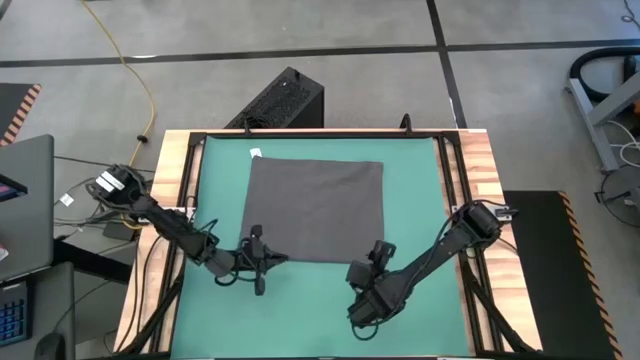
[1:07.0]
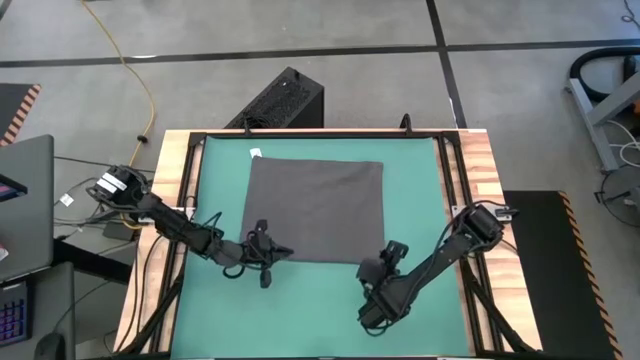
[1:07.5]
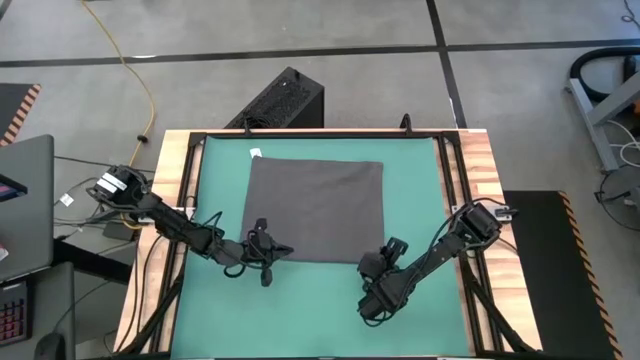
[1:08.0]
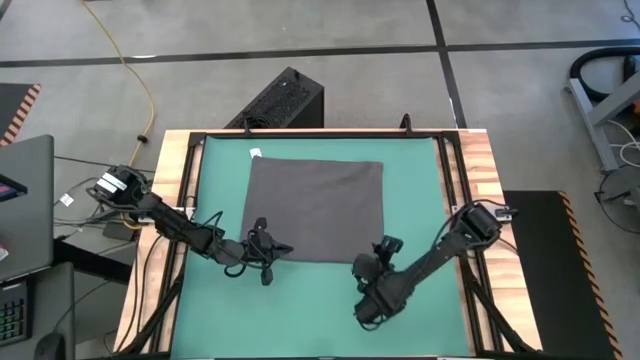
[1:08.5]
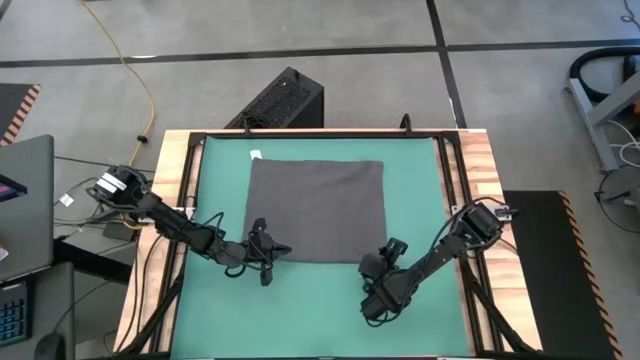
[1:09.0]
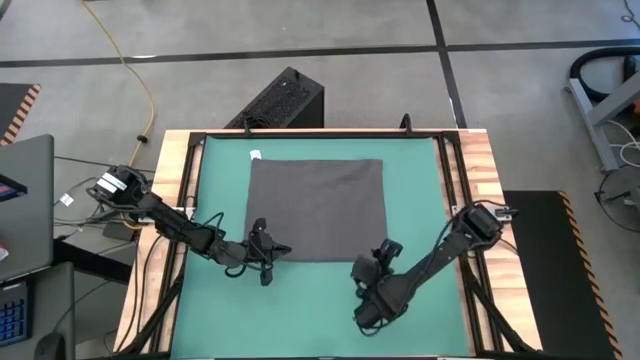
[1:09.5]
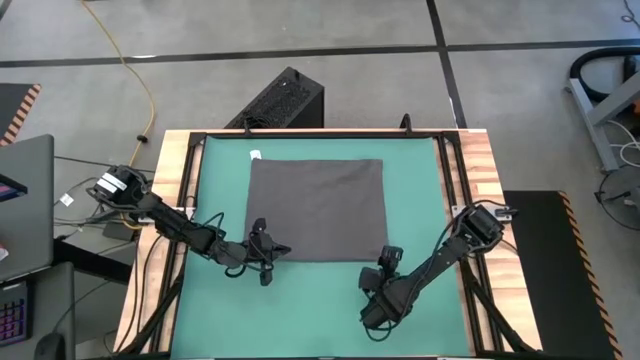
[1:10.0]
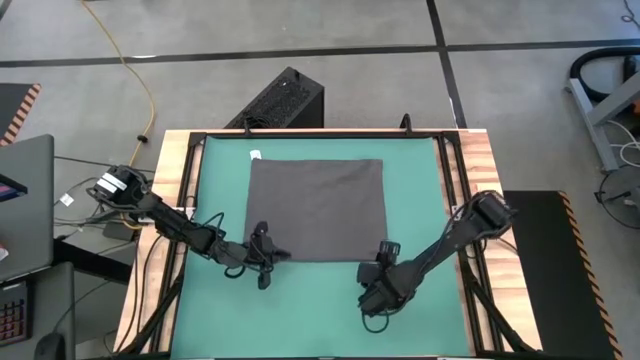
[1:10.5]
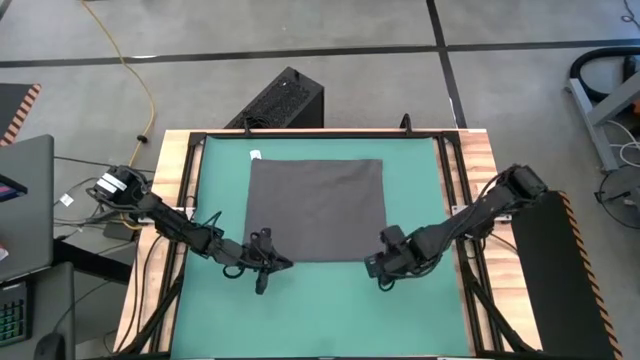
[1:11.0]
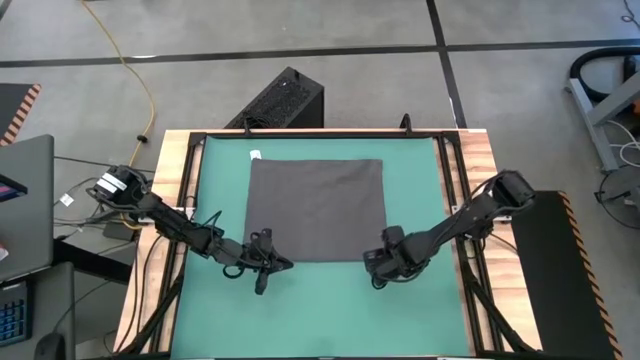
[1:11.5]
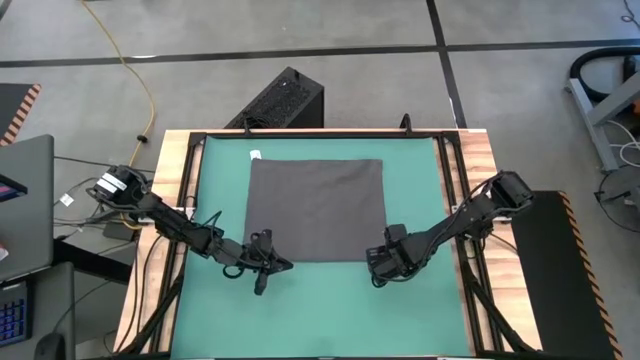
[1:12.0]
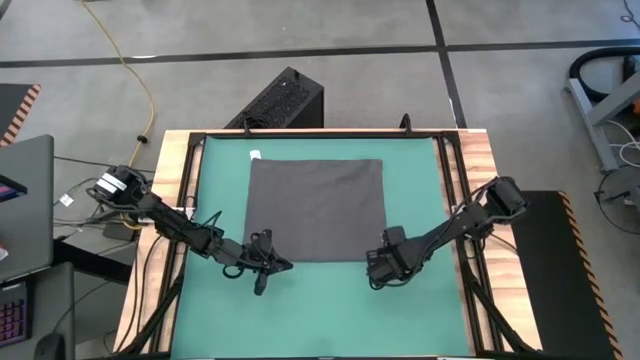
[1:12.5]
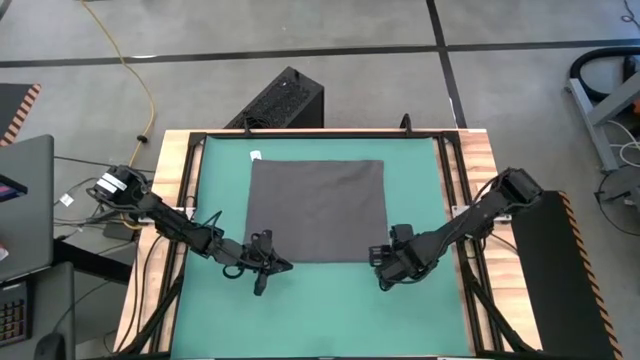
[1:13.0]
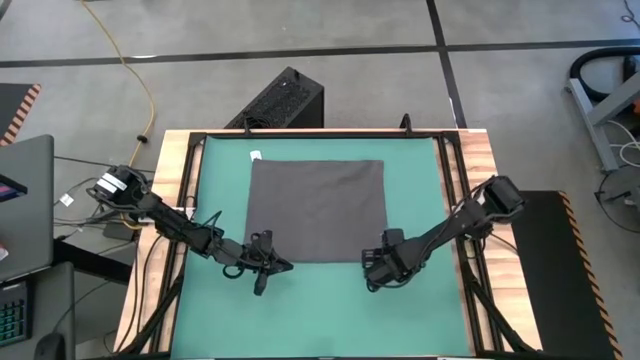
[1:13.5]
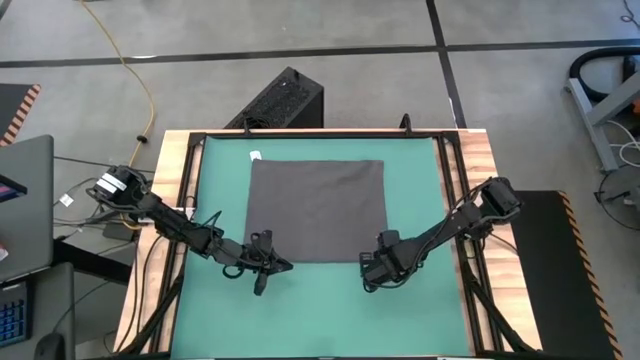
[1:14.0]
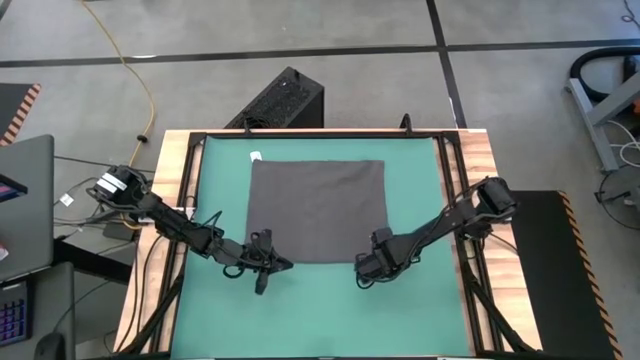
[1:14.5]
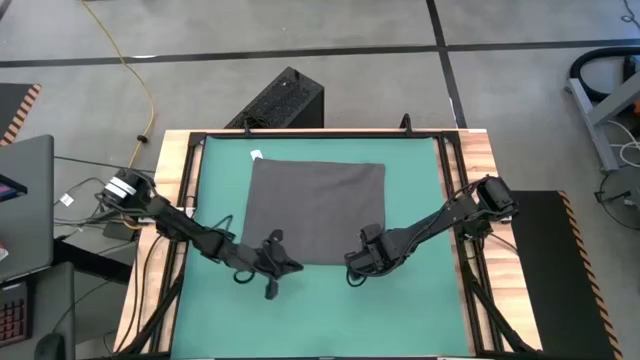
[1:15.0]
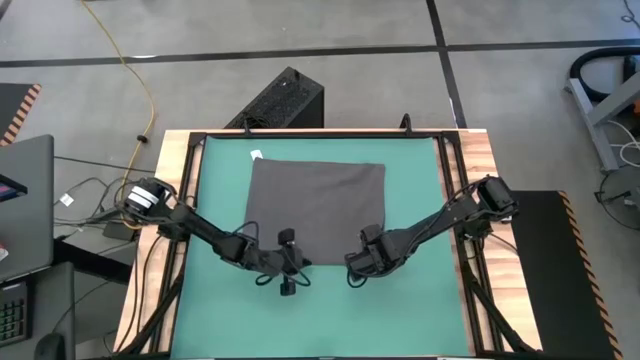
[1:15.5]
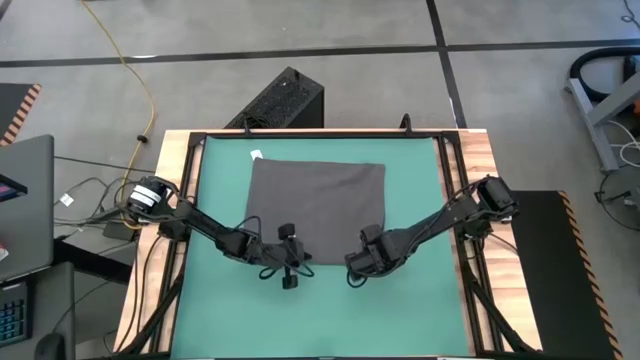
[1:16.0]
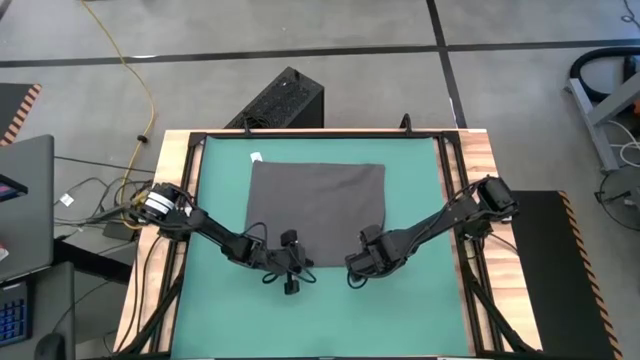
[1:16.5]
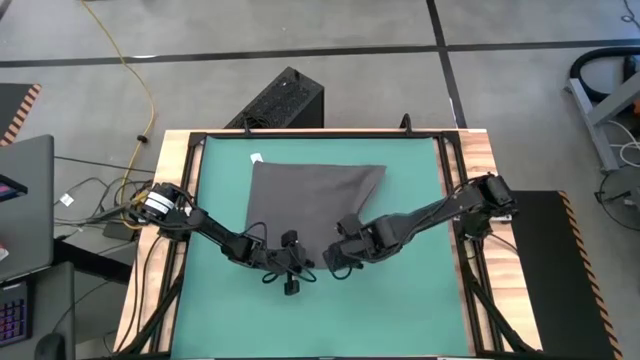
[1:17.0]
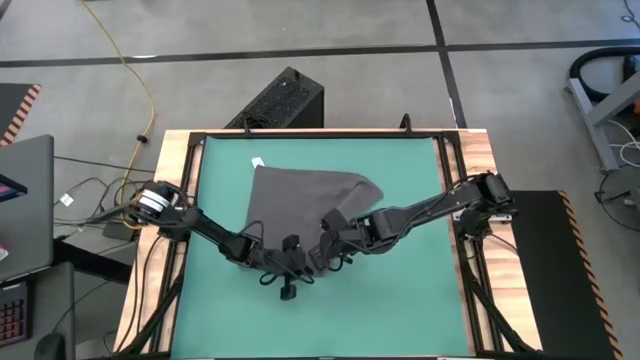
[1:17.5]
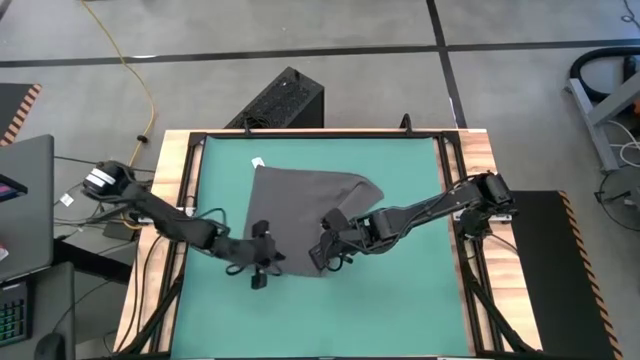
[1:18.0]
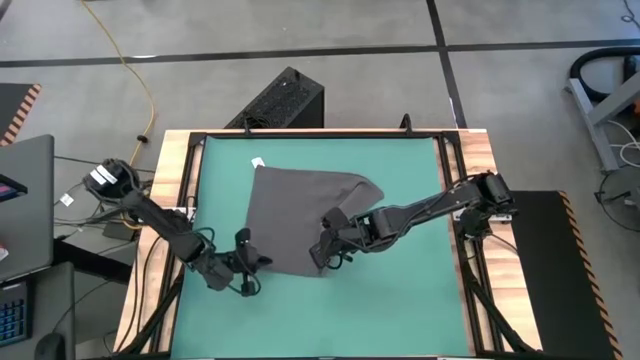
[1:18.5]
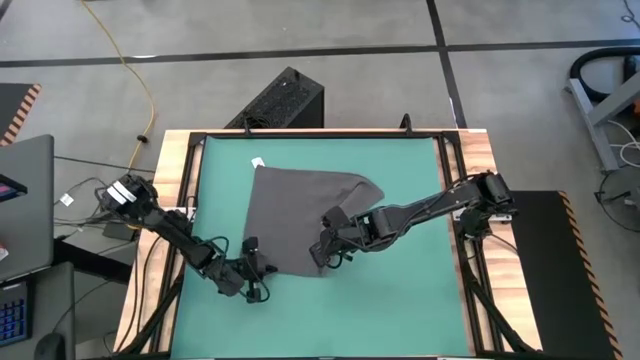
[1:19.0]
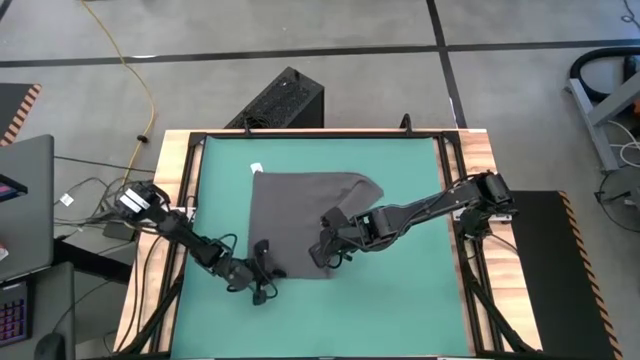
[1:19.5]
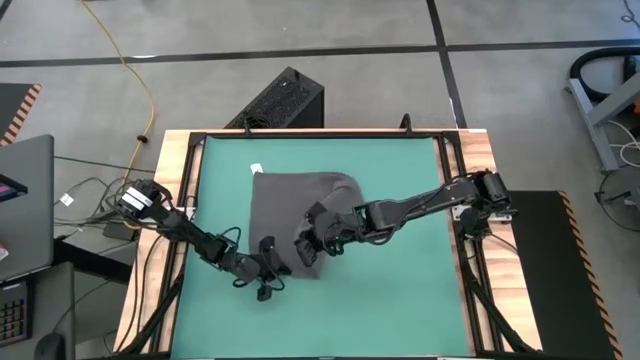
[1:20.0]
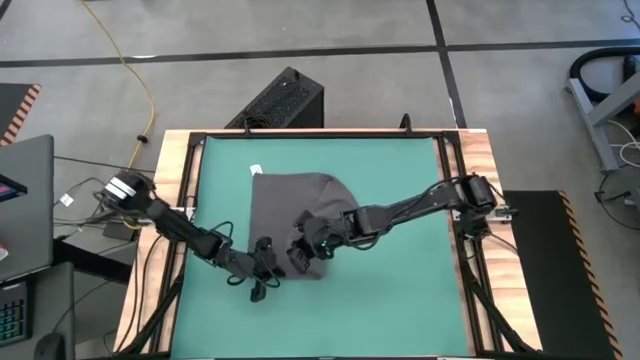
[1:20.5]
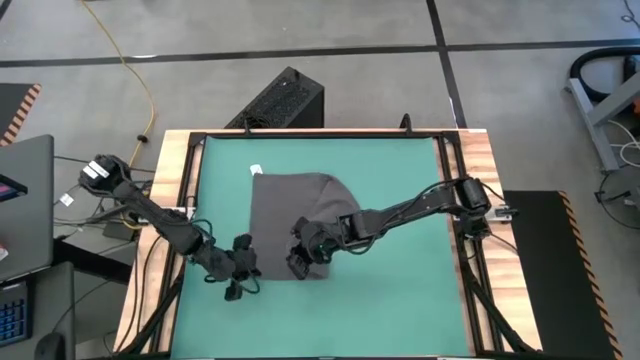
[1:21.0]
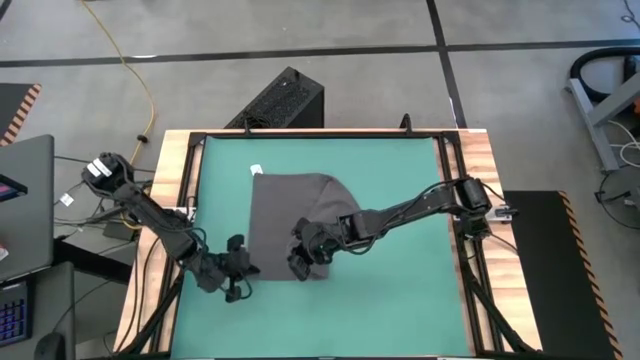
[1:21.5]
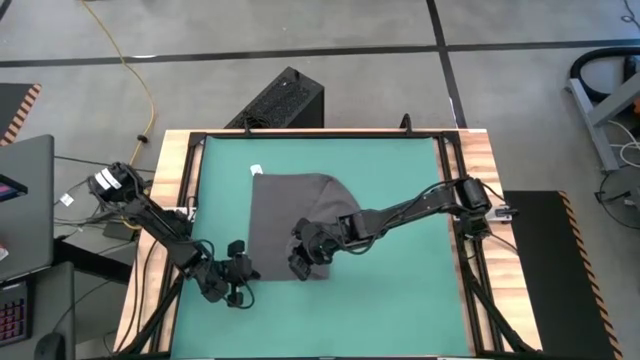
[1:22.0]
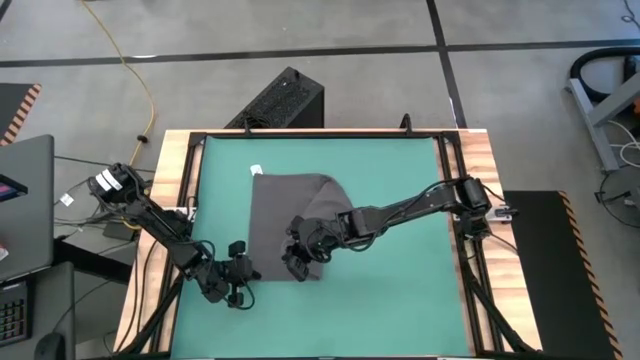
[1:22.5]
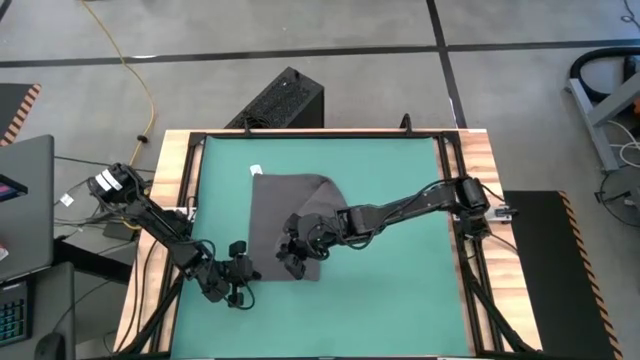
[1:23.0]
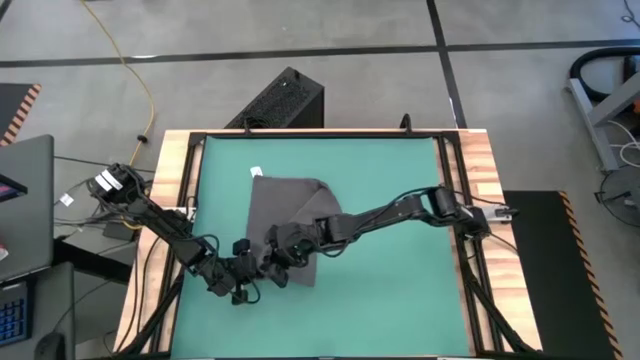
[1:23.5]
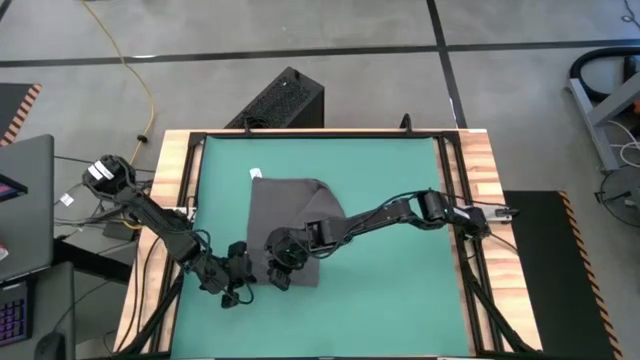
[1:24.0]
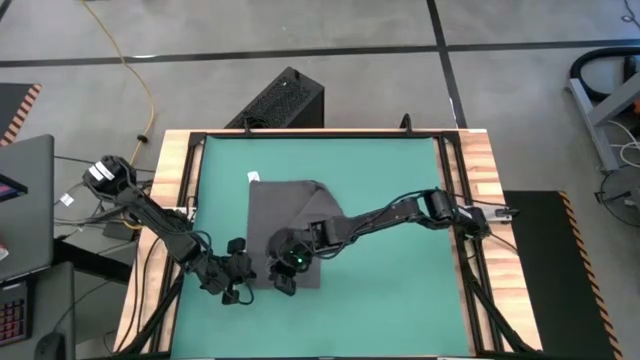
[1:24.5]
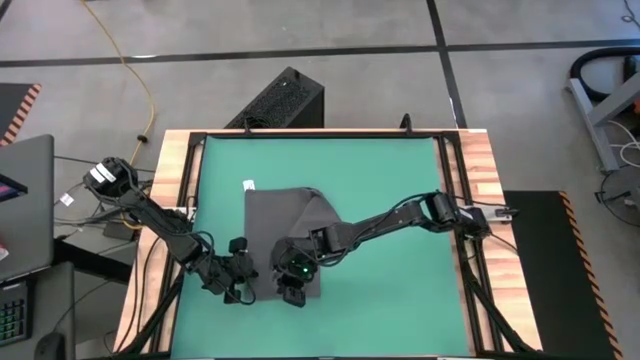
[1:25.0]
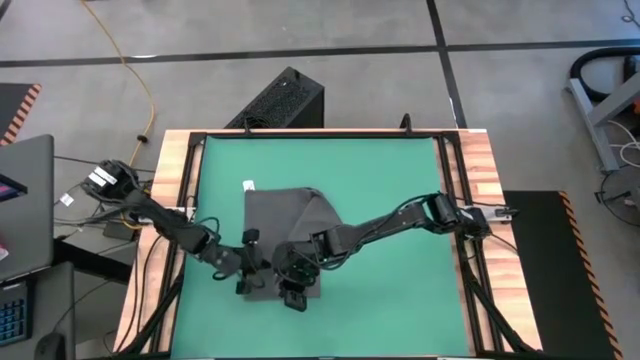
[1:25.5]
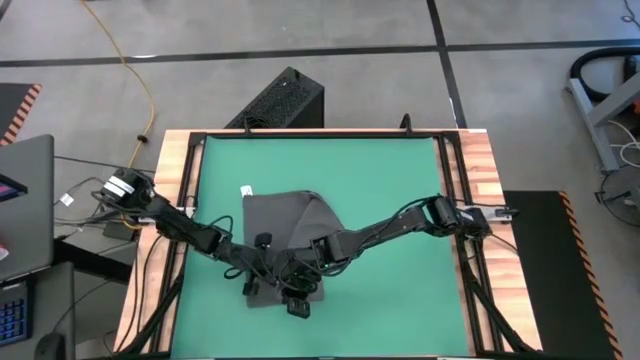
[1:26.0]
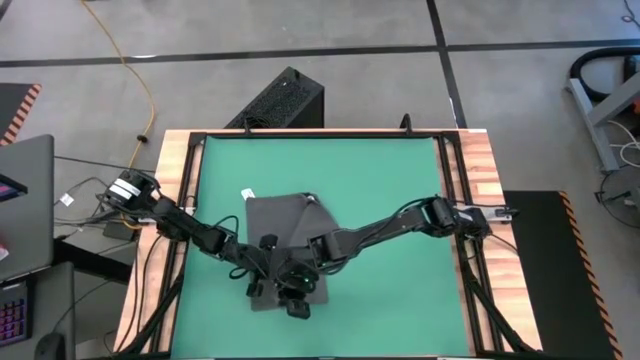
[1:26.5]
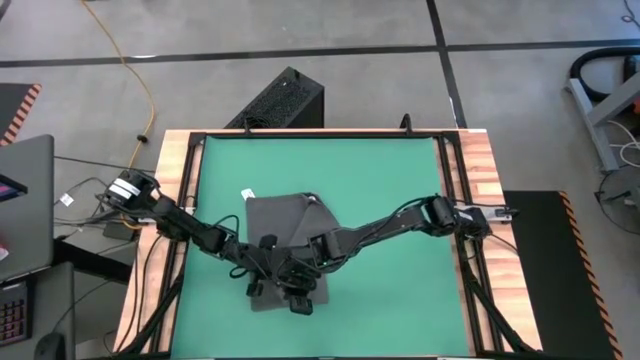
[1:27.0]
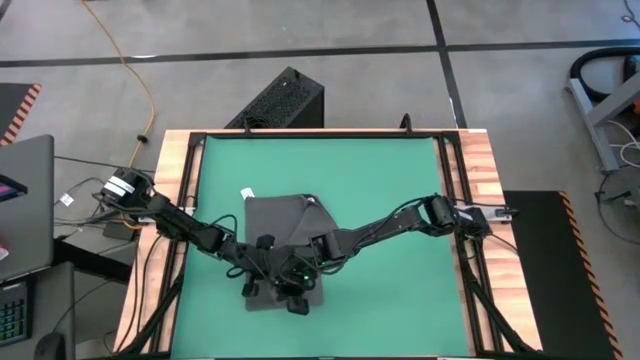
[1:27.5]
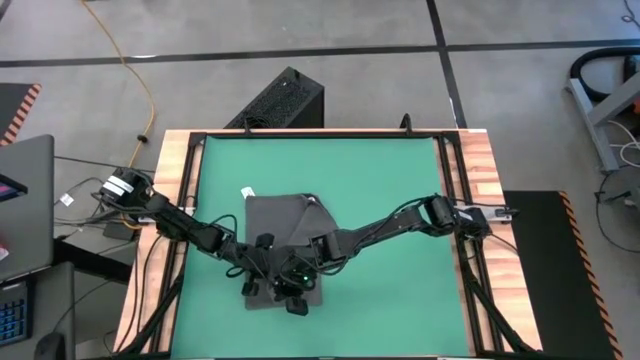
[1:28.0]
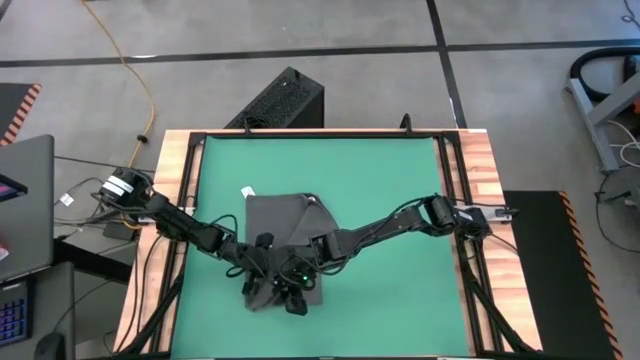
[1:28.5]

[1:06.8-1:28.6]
Task: Roll towel
Fold the microfiber towel
